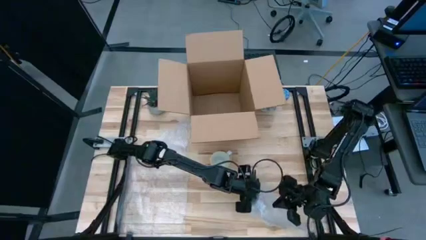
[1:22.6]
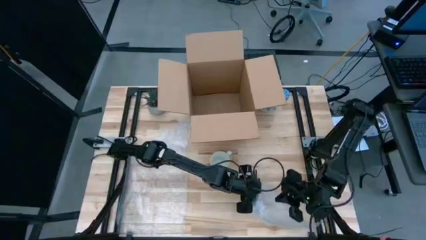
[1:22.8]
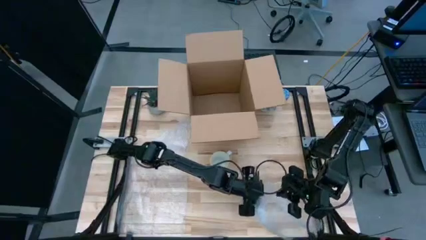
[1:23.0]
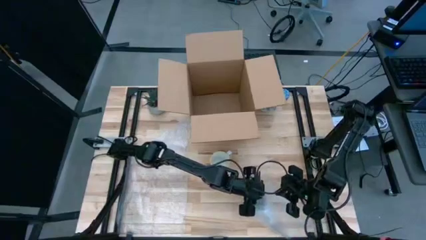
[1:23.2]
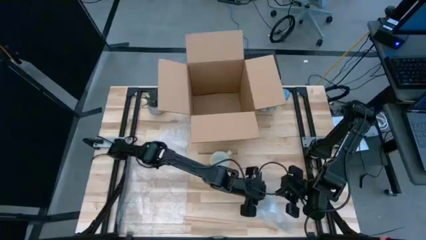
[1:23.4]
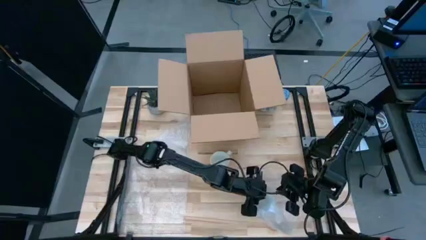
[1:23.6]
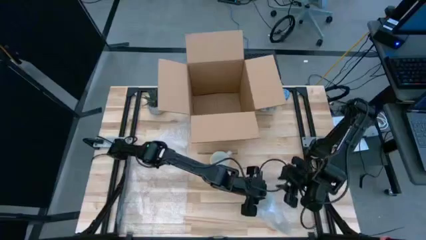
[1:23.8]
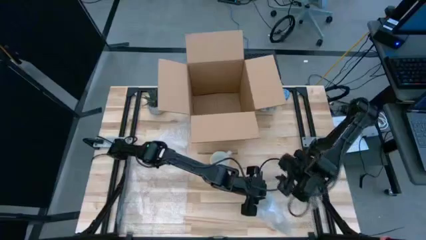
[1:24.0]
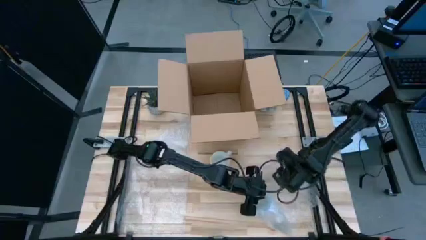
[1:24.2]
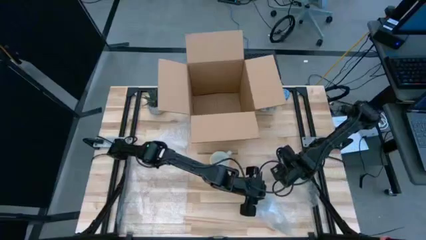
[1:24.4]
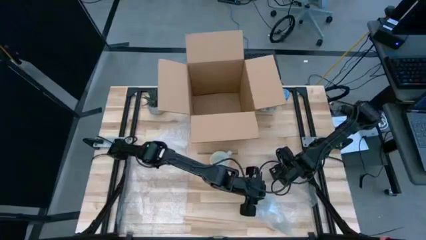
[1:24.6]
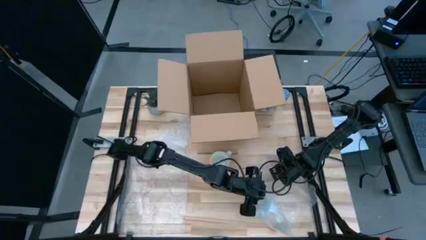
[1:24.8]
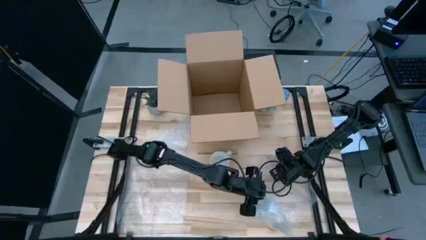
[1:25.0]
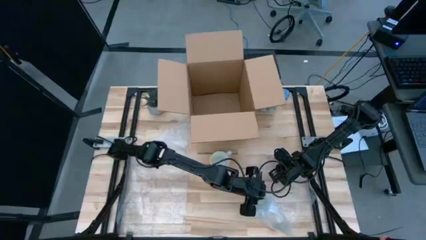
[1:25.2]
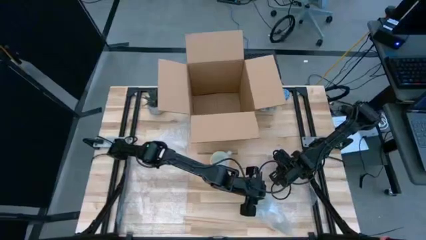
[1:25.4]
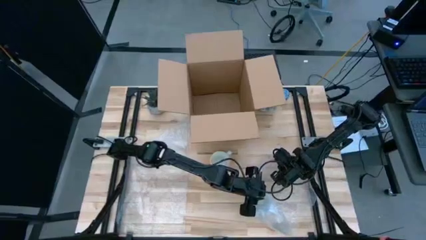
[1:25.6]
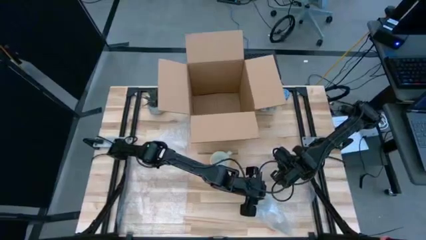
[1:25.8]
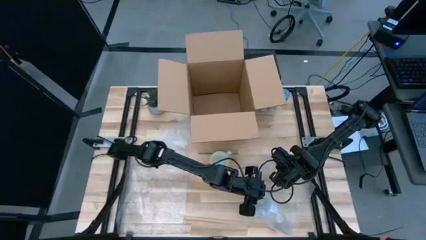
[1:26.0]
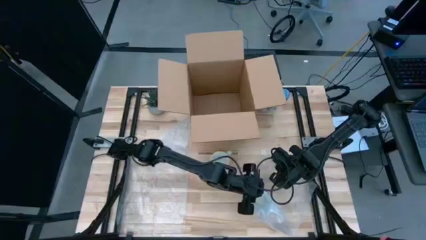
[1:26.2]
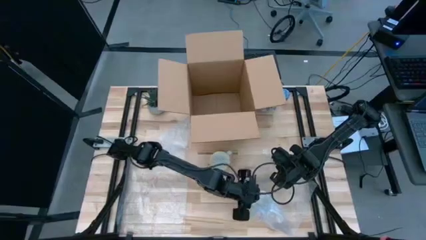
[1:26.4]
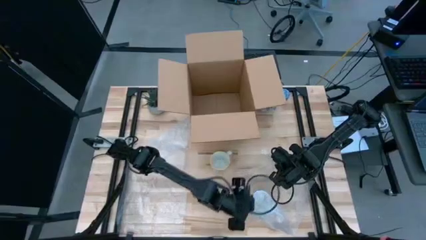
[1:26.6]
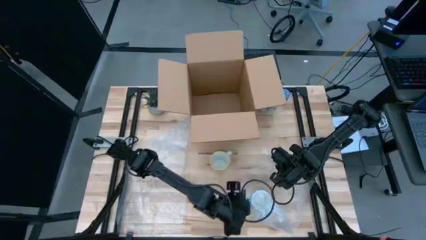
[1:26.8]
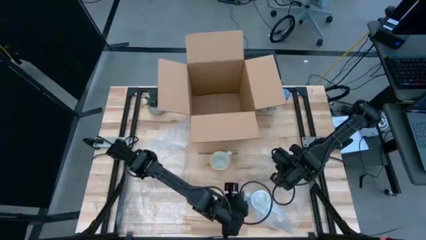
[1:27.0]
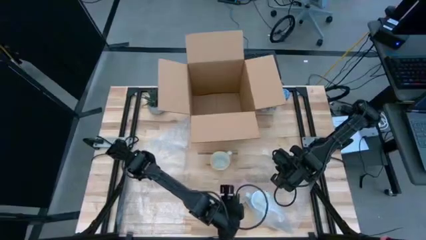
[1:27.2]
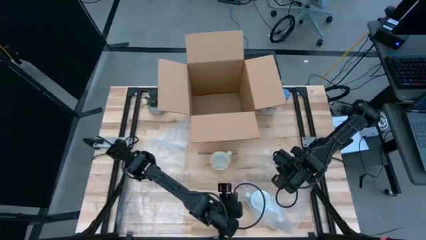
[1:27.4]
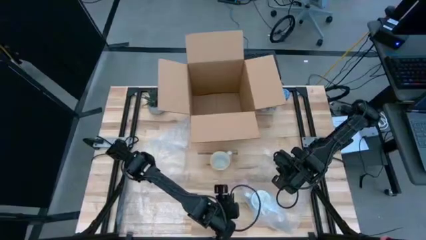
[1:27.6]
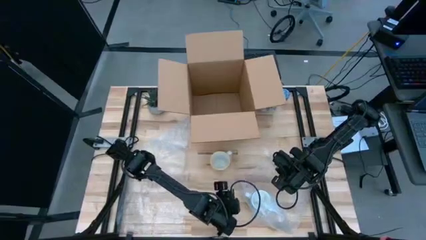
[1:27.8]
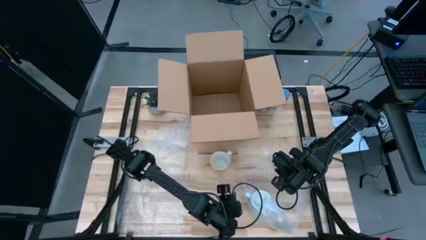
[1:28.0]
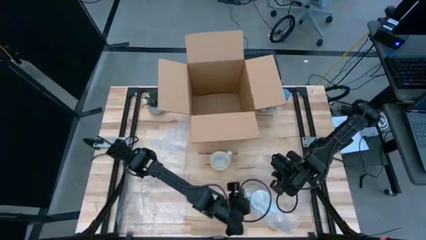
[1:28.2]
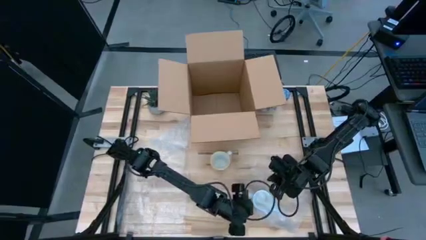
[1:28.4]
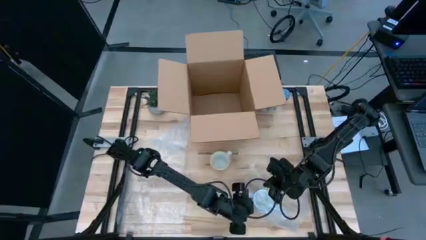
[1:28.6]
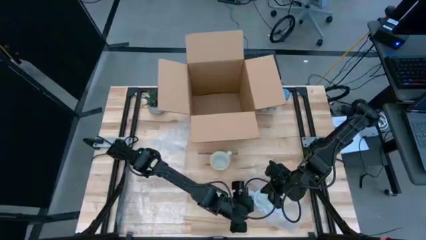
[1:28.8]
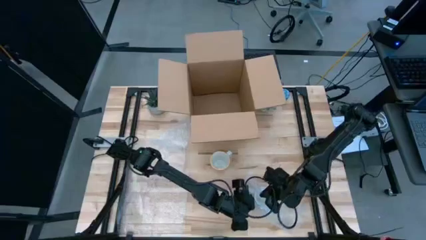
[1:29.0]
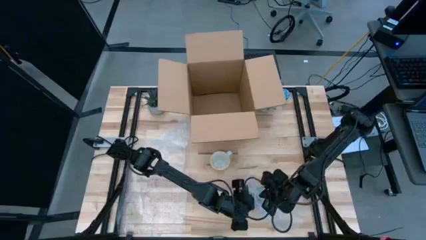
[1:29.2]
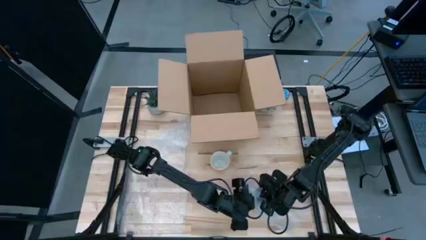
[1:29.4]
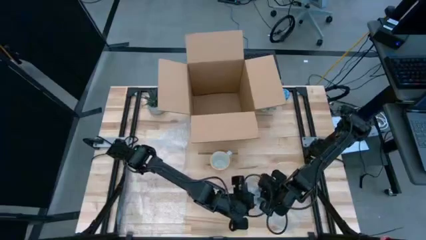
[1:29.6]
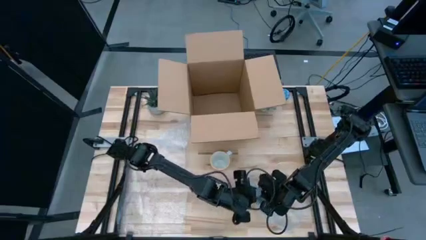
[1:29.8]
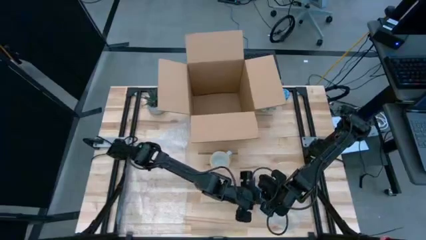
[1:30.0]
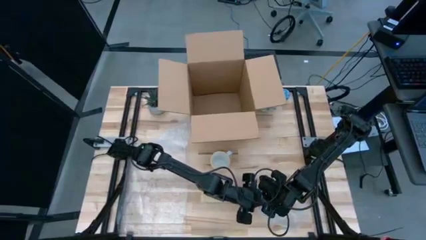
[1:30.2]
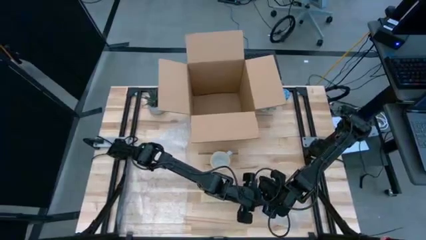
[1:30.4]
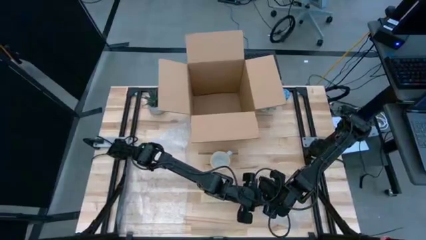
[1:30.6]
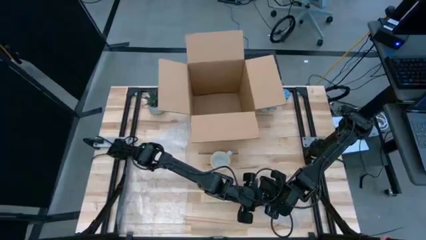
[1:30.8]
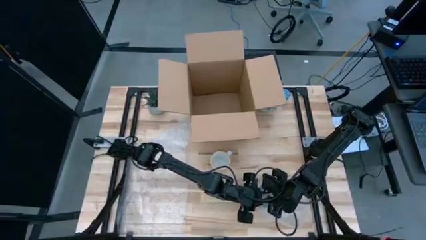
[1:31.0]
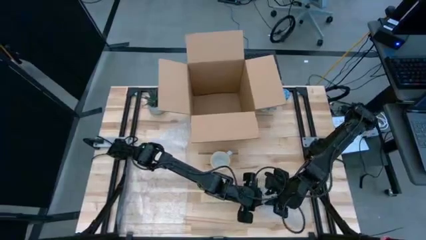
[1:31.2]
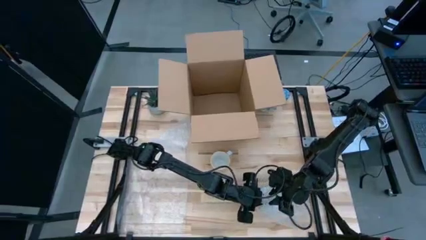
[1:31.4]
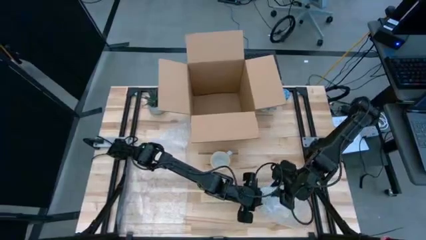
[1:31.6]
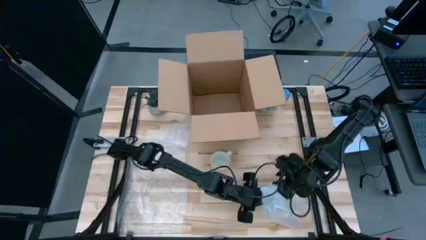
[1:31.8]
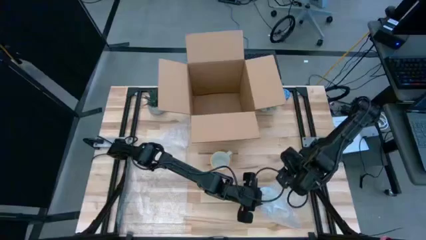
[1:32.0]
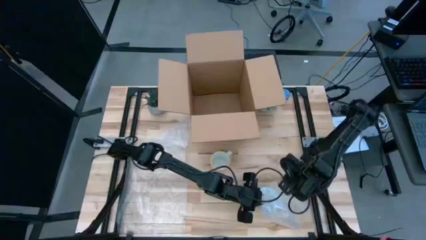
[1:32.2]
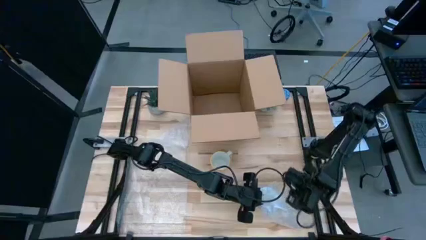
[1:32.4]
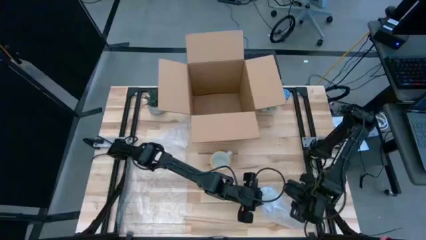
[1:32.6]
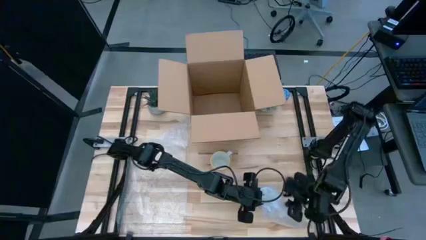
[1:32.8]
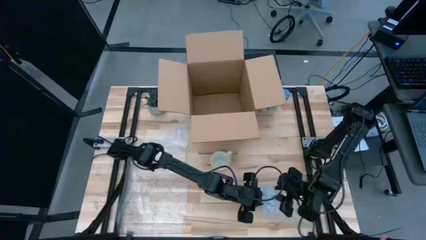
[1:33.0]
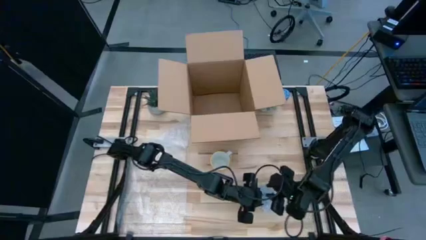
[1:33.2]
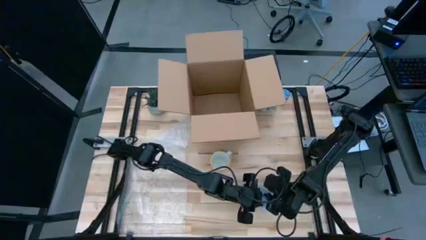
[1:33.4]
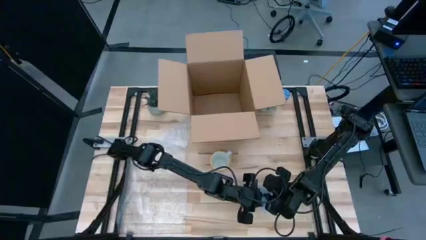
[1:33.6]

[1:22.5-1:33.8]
Task: wrap mug
Wrap the red mug with bubble wrap
